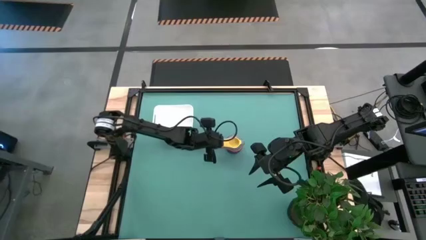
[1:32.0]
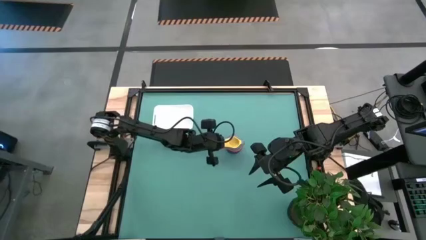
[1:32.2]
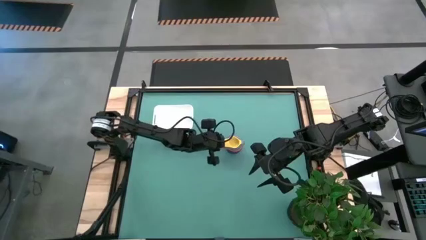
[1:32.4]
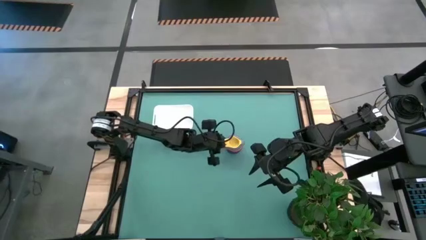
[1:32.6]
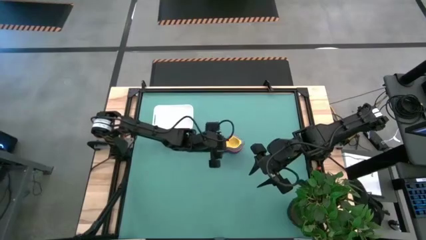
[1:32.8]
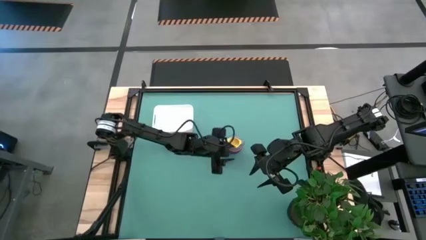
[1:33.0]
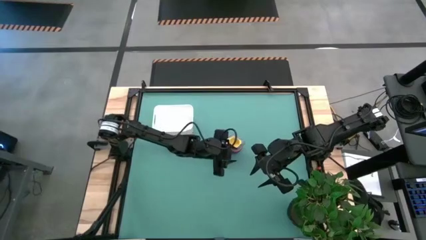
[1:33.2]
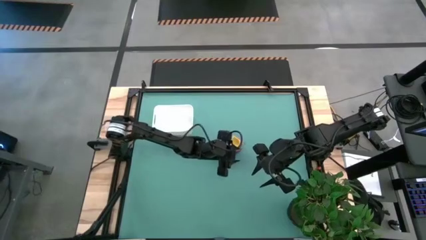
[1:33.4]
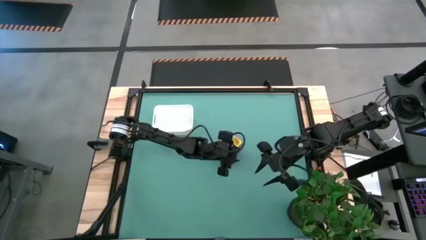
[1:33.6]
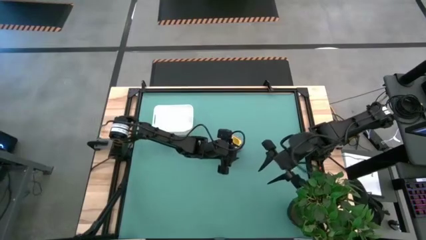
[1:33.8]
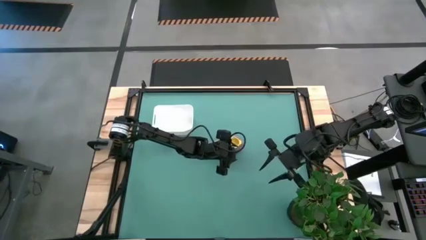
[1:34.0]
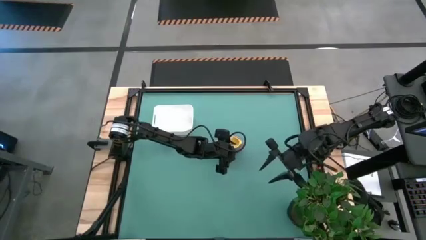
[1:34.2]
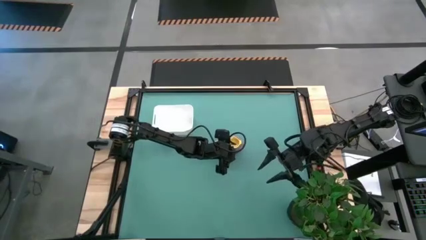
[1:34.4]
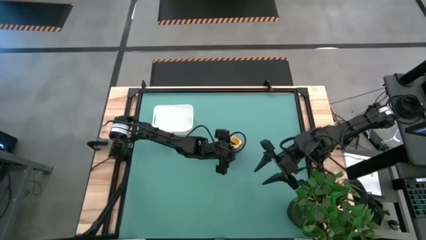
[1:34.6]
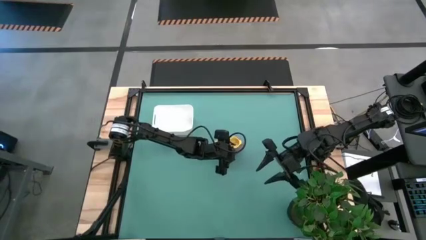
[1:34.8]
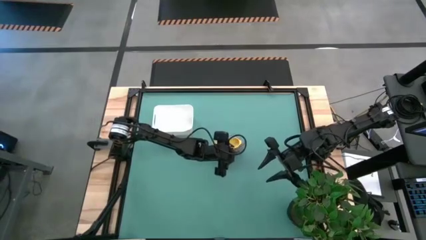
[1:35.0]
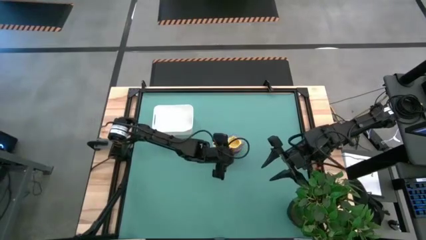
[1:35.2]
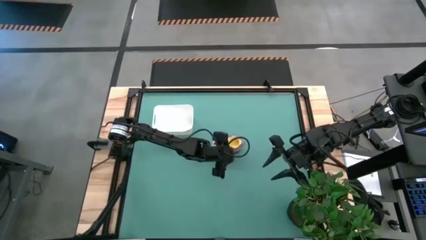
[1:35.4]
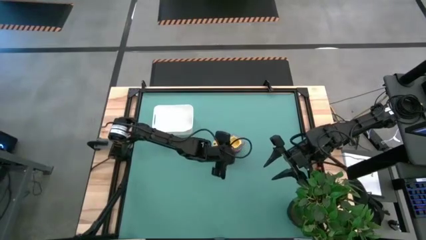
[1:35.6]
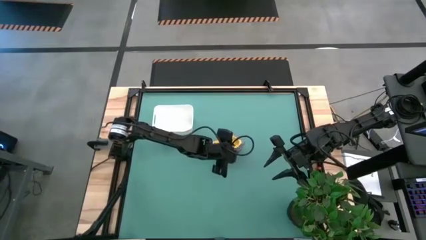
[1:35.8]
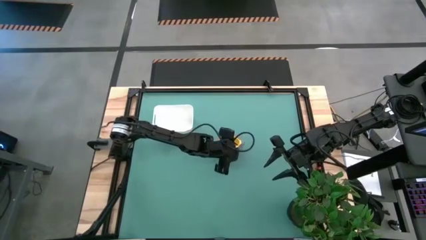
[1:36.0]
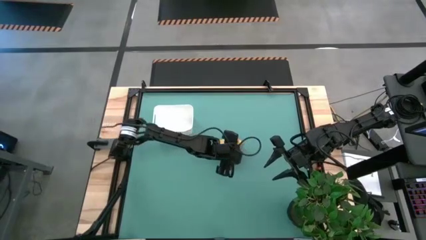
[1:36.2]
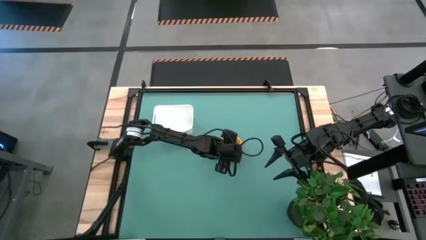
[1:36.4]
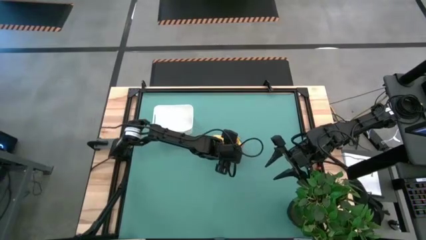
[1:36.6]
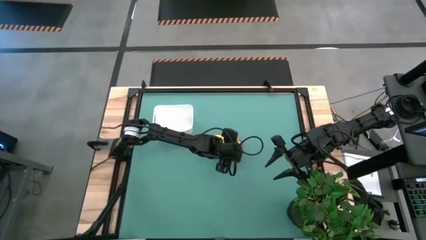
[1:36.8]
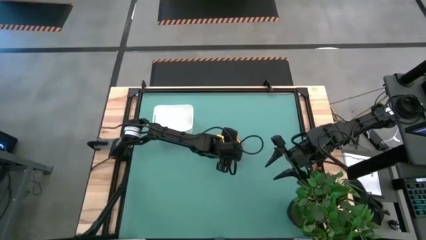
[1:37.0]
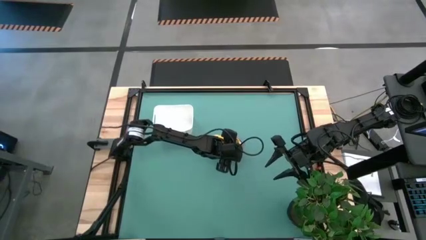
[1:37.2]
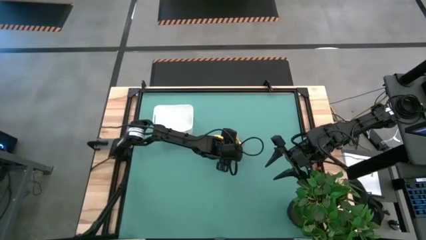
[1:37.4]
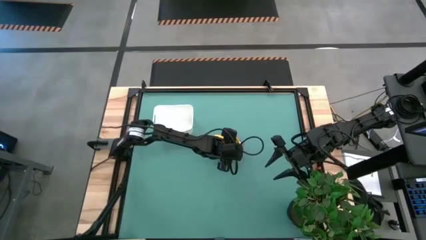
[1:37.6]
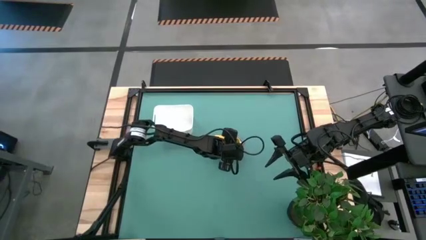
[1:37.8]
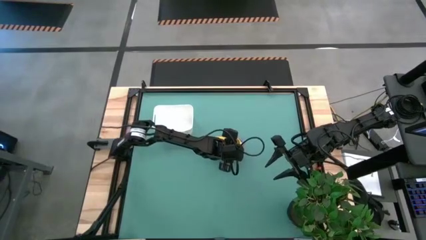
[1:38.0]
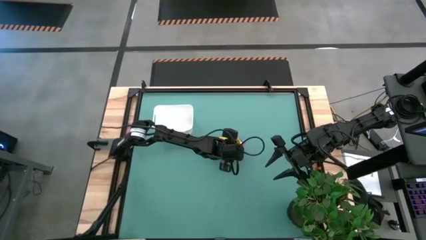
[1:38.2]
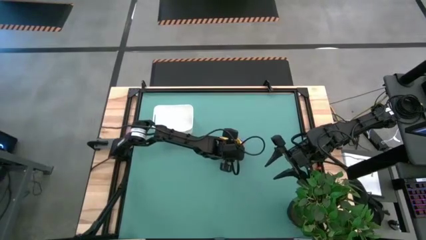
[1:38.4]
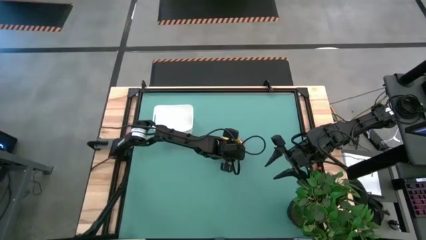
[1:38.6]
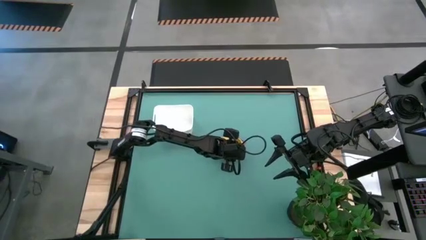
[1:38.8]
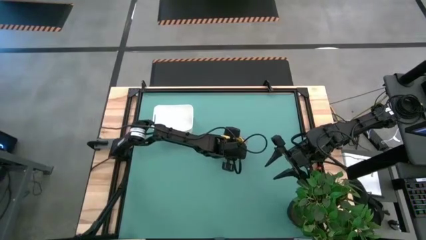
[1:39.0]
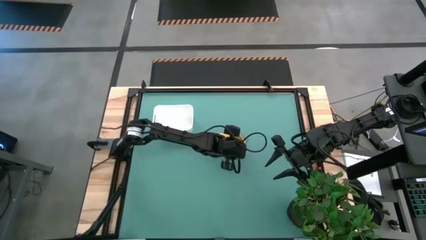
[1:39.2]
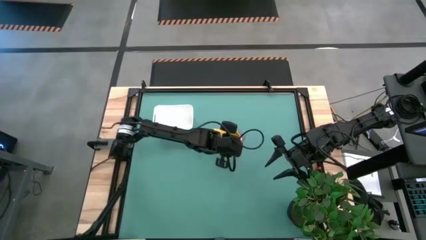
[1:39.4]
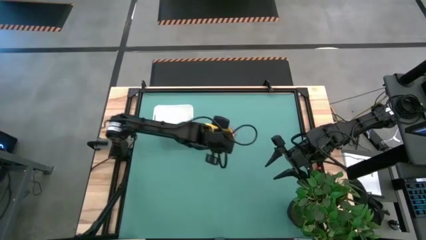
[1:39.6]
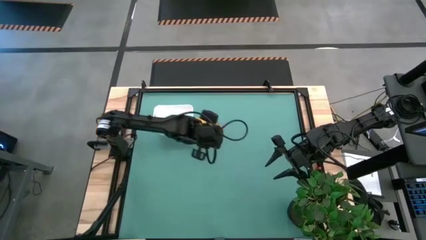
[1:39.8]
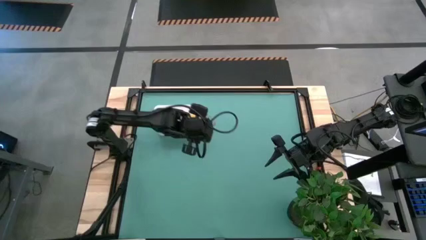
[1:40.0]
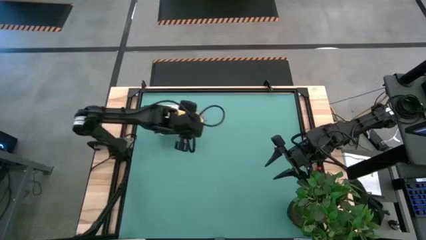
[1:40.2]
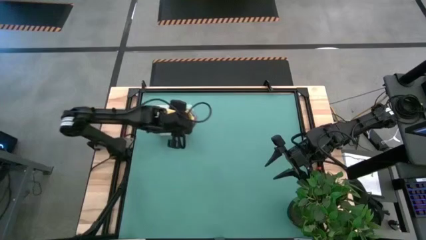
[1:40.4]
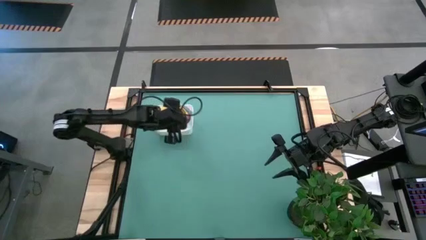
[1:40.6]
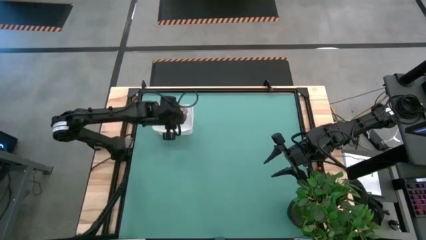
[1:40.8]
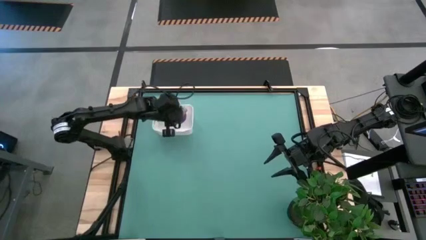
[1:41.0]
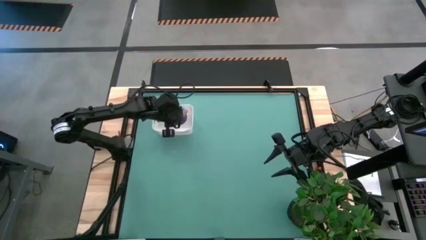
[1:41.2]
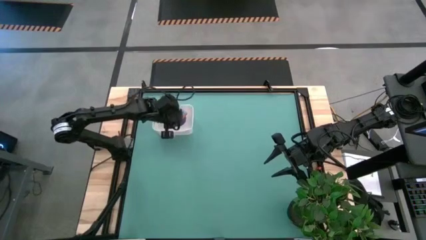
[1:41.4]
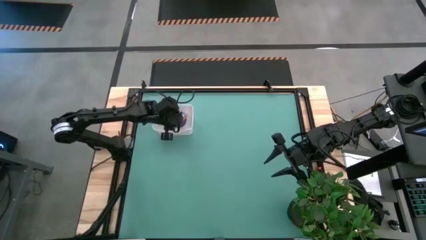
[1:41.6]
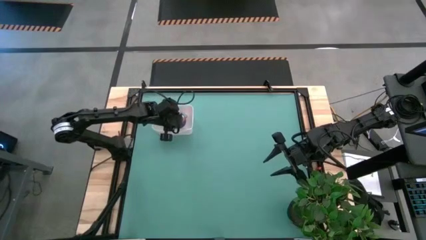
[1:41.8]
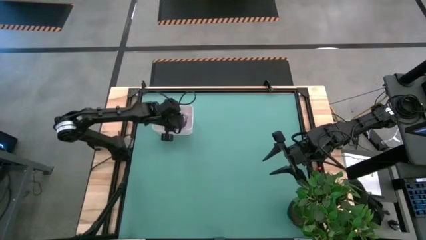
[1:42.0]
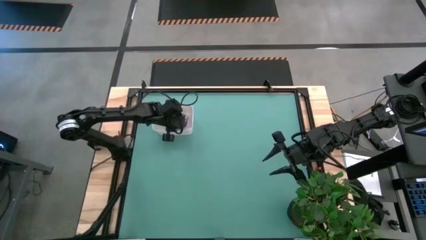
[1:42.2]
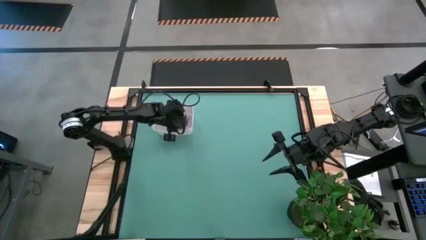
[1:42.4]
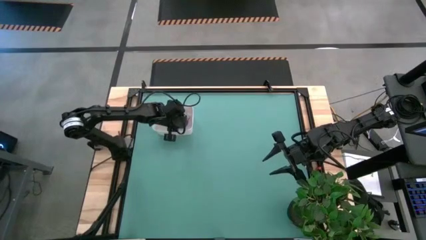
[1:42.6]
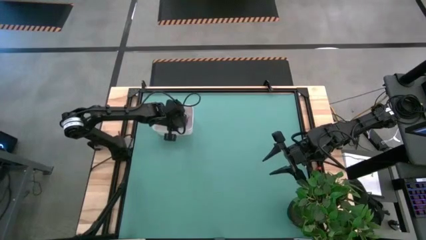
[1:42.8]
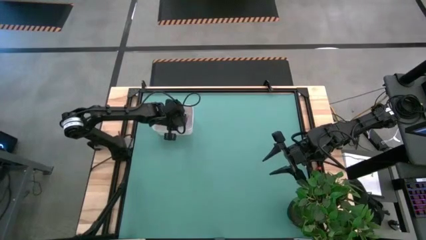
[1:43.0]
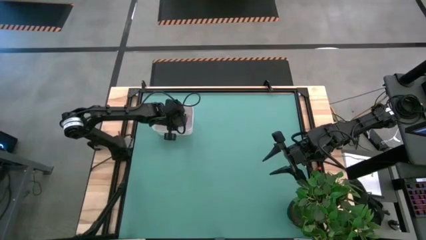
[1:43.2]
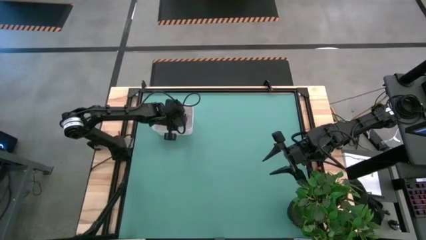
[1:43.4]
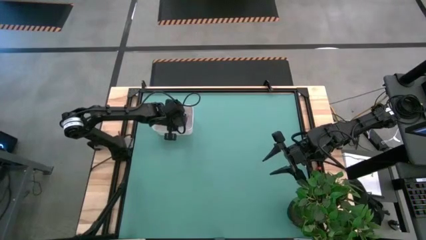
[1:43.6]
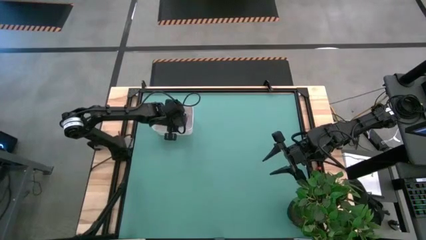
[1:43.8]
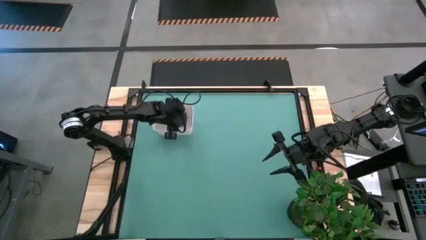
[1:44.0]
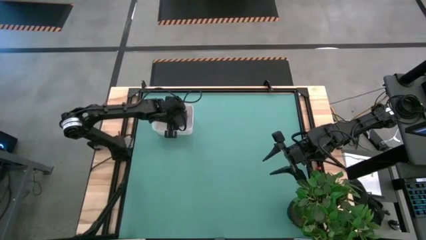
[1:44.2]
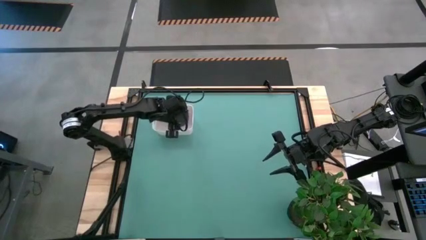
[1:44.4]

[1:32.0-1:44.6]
Task: Nest measuring cups in basket
Put the nested measuring cups into the white bin

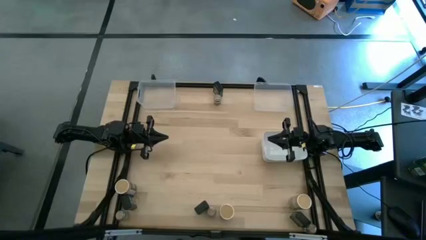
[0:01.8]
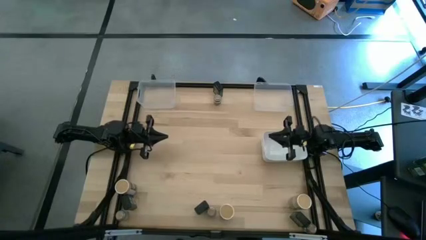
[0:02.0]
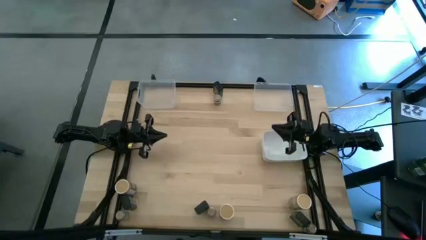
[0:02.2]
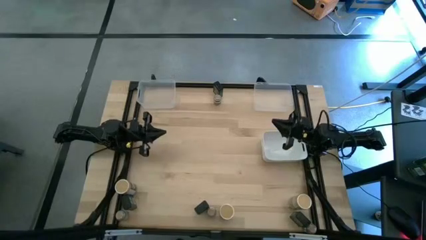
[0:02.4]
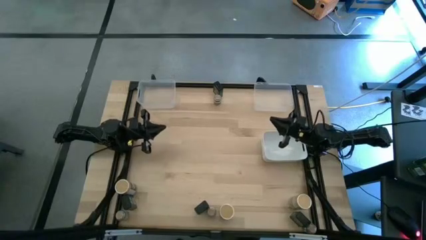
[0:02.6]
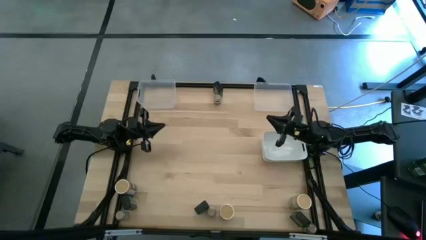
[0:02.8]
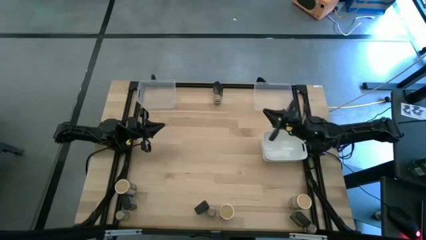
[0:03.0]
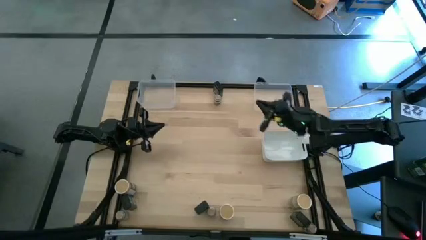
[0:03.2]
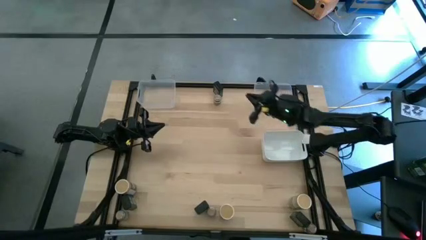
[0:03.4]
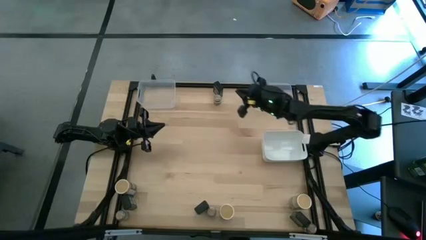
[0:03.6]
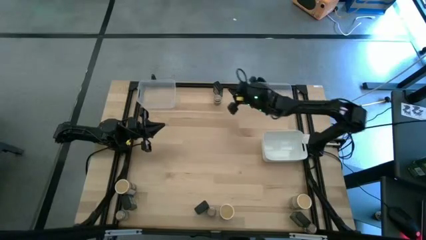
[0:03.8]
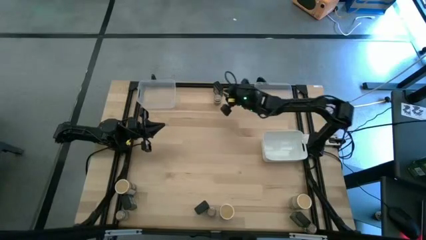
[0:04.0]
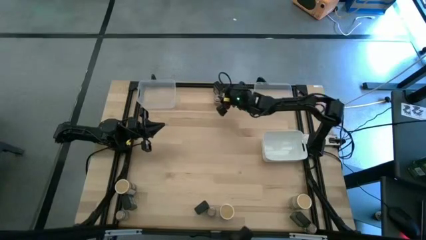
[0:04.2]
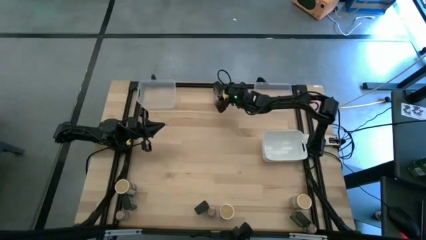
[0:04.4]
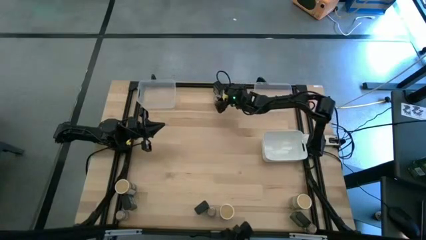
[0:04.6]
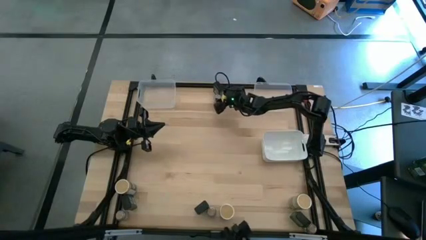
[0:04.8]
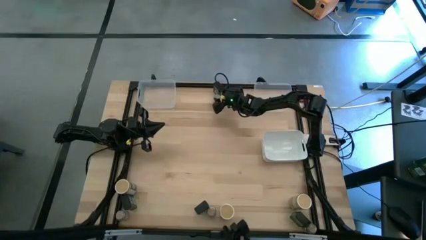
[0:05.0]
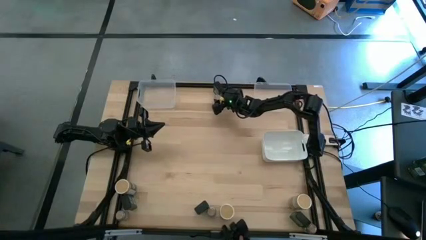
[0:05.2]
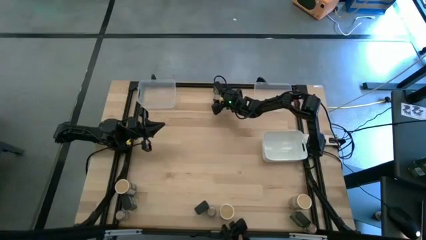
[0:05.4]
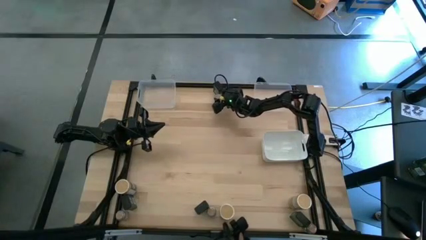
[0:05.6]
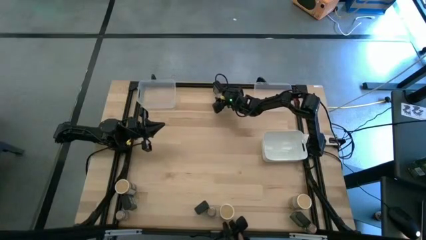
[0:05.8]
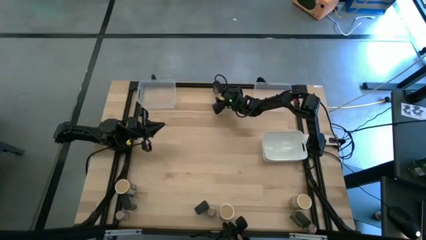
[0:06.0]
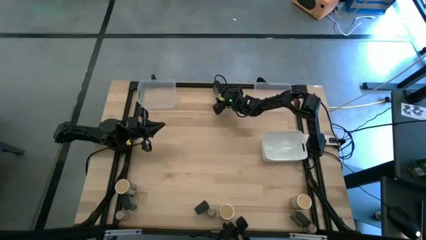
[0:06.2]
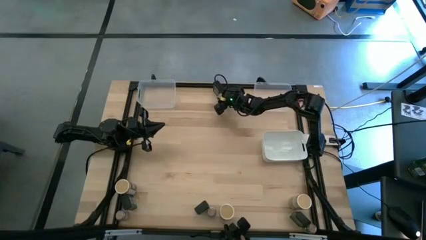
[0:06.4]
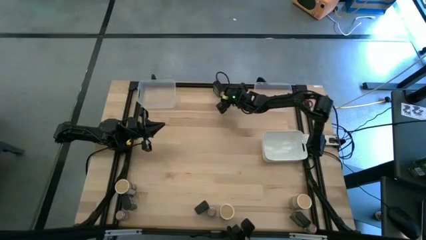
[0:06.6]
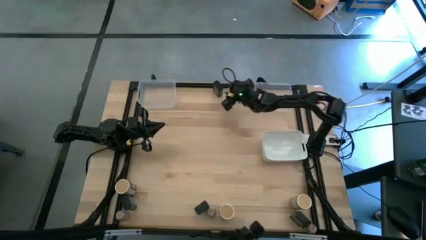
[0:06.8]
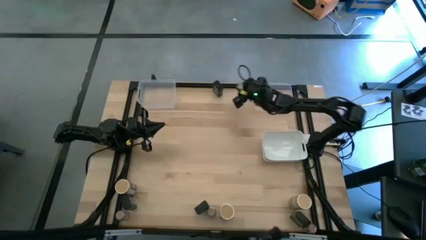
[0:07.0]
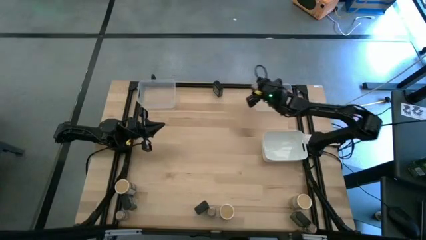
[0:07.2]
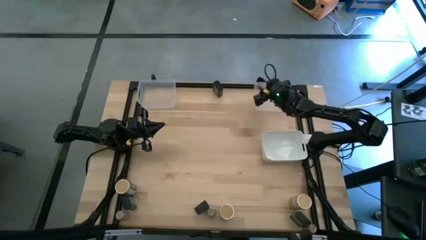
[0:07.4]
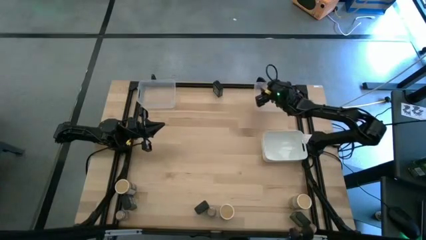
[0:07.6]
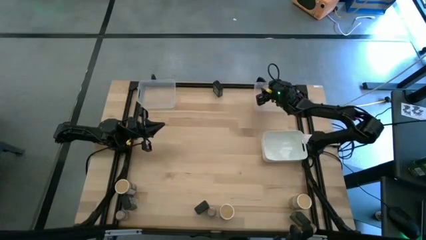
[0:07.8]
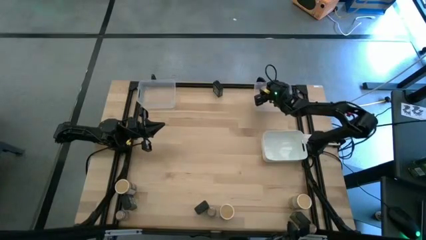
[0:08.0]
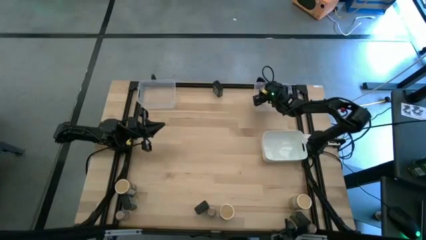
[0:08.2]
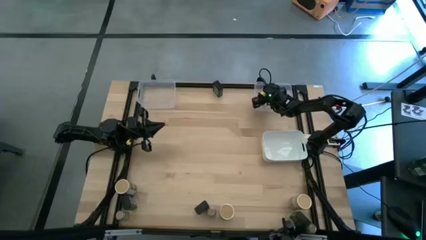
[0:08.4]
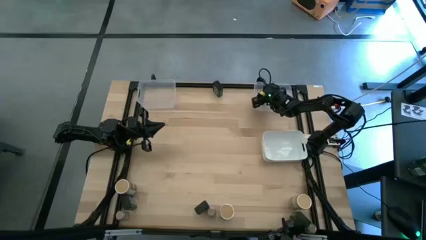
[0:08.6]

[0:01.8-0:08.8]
Task: Sort spices by type
Put the top brown seasoning bottle into the right transparent bin
